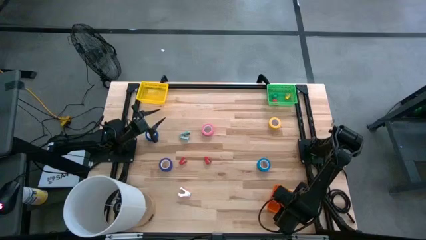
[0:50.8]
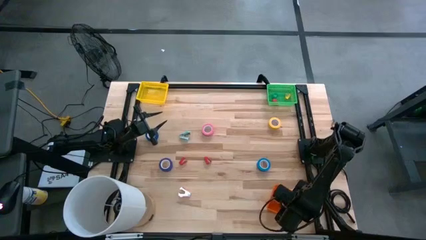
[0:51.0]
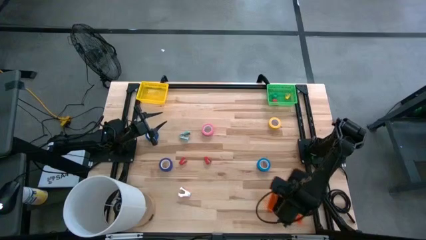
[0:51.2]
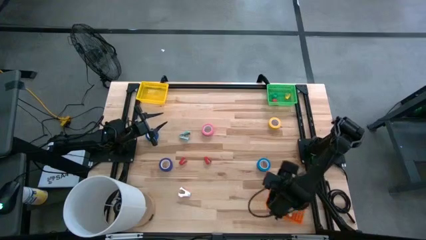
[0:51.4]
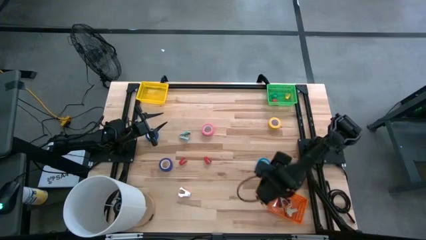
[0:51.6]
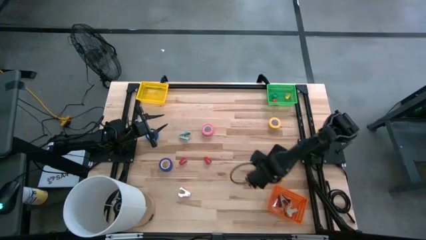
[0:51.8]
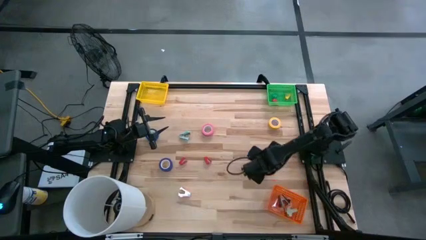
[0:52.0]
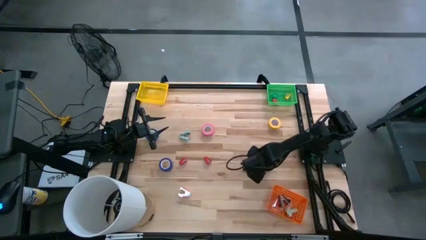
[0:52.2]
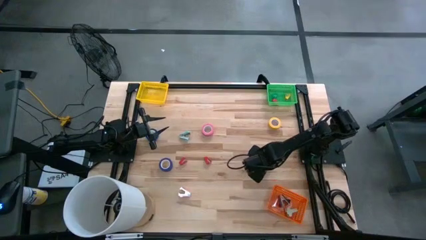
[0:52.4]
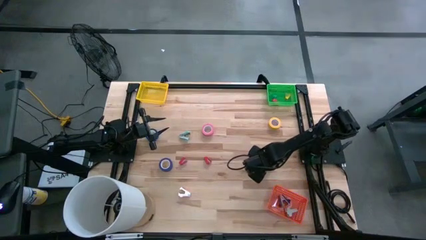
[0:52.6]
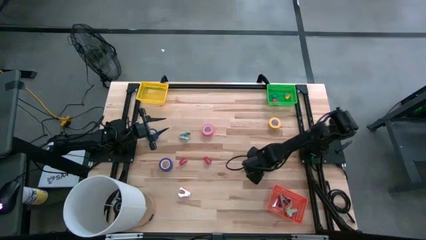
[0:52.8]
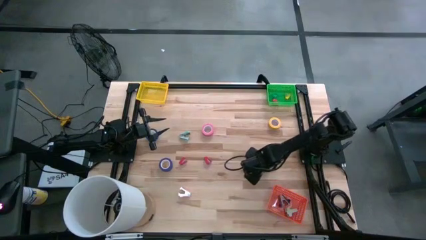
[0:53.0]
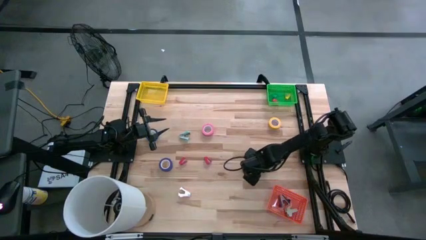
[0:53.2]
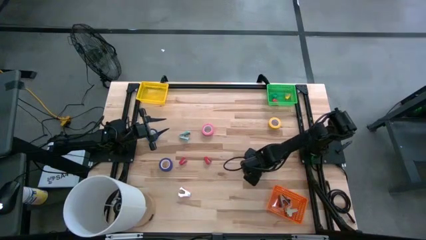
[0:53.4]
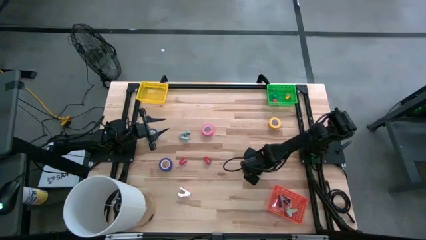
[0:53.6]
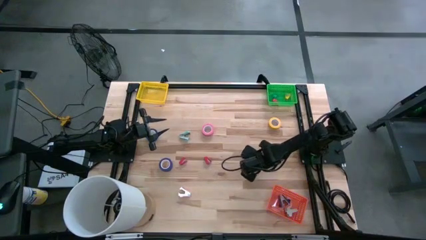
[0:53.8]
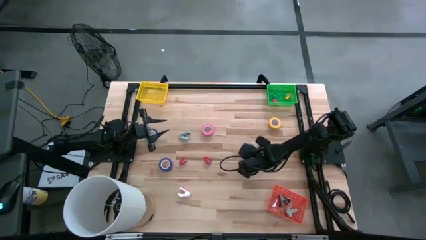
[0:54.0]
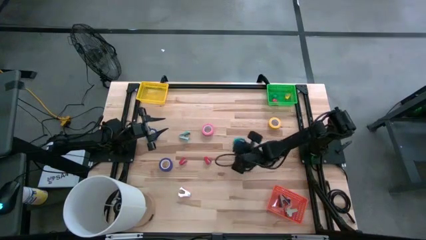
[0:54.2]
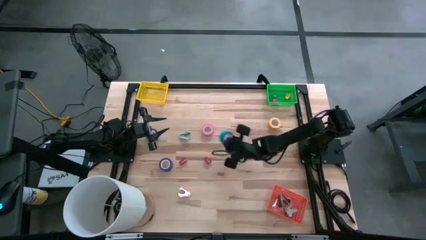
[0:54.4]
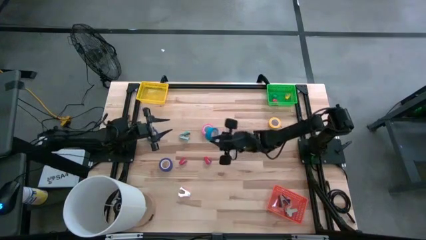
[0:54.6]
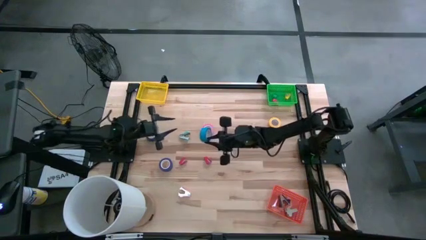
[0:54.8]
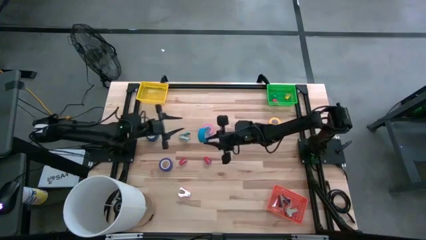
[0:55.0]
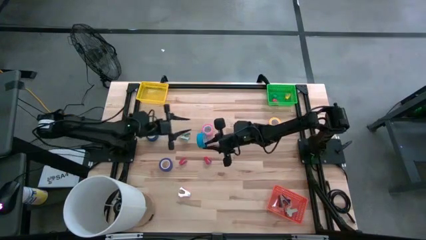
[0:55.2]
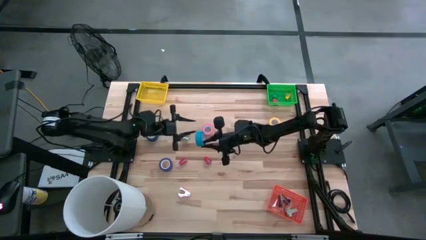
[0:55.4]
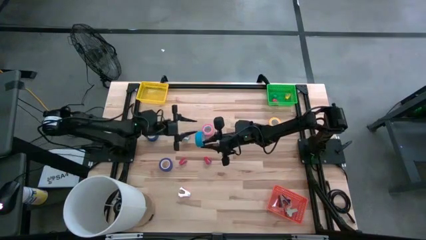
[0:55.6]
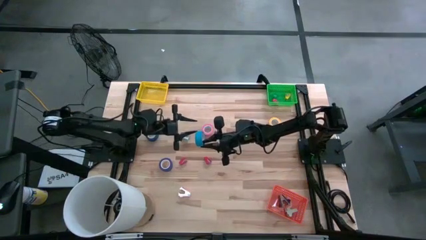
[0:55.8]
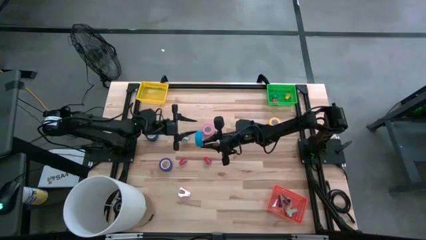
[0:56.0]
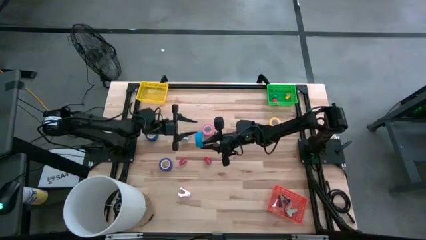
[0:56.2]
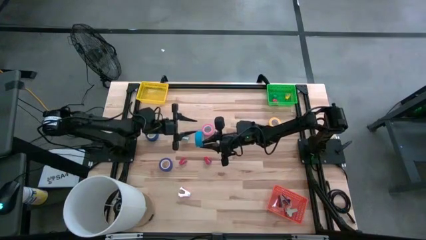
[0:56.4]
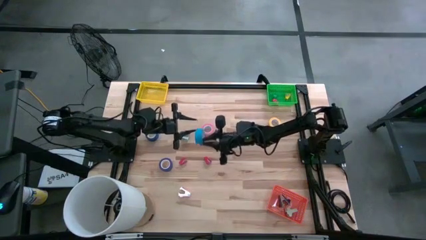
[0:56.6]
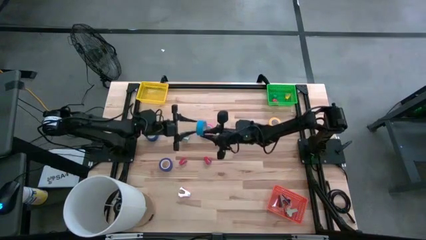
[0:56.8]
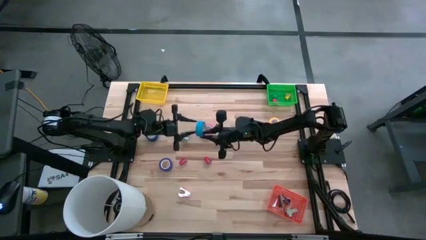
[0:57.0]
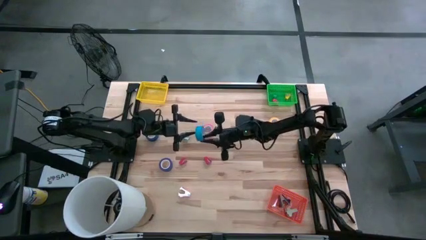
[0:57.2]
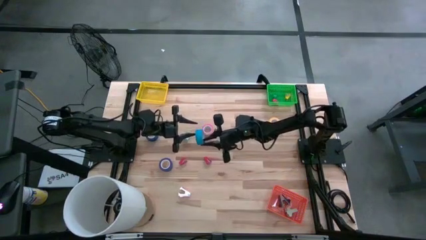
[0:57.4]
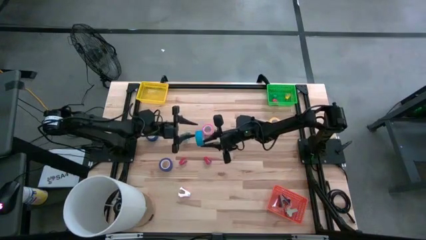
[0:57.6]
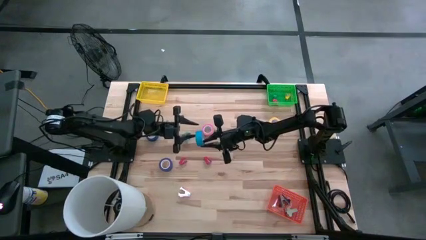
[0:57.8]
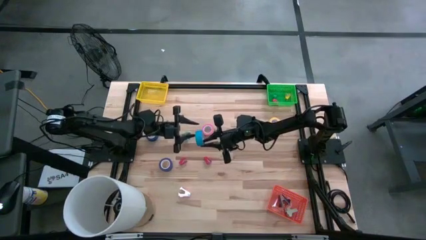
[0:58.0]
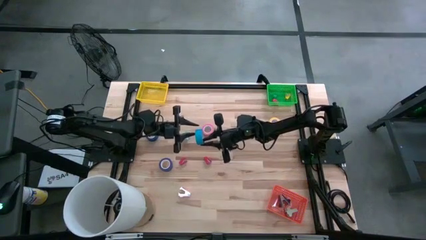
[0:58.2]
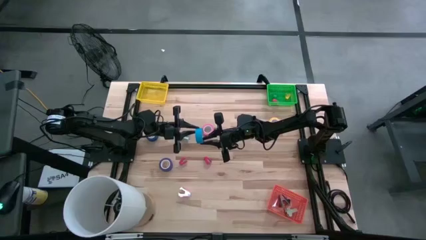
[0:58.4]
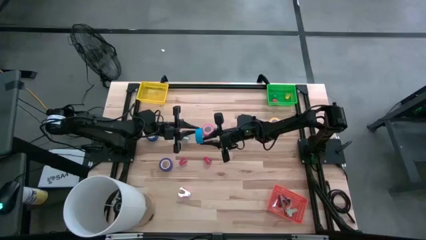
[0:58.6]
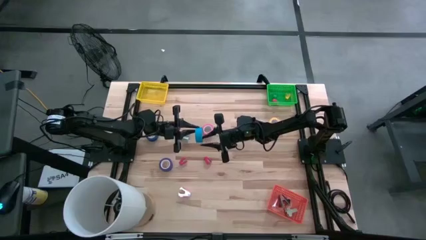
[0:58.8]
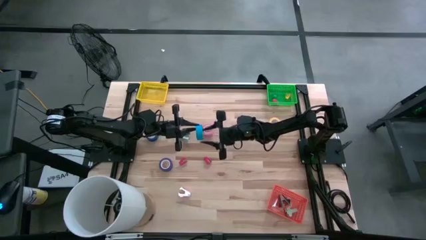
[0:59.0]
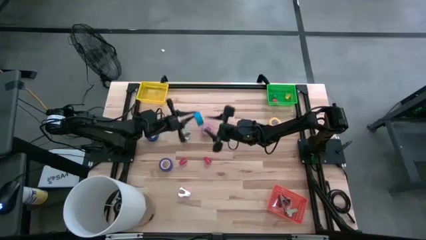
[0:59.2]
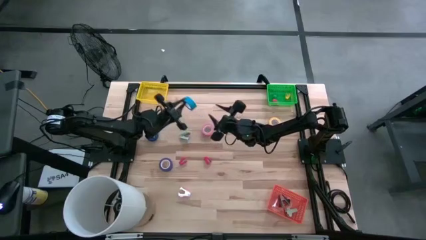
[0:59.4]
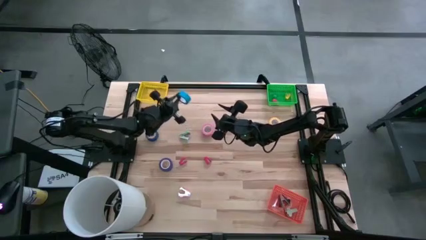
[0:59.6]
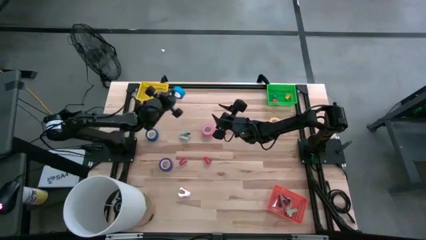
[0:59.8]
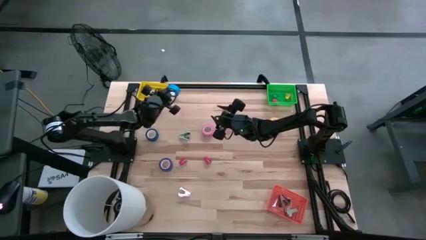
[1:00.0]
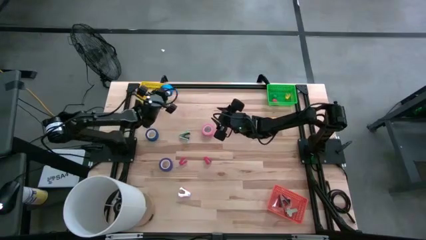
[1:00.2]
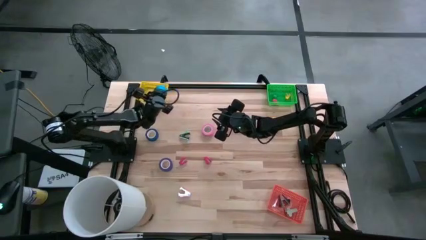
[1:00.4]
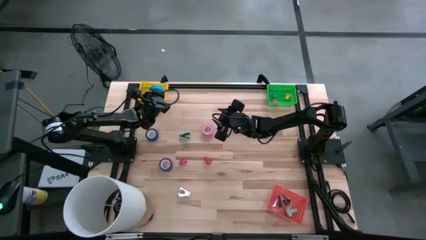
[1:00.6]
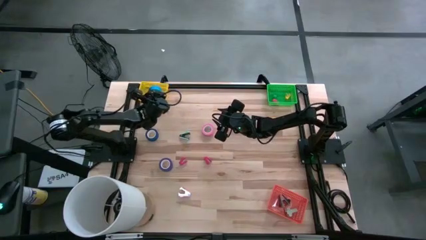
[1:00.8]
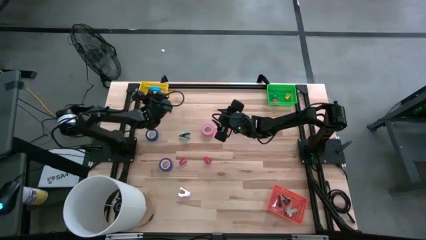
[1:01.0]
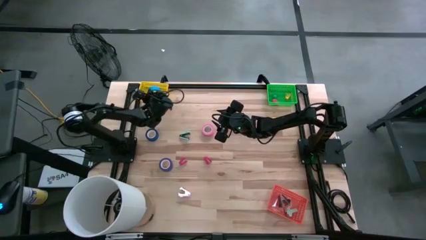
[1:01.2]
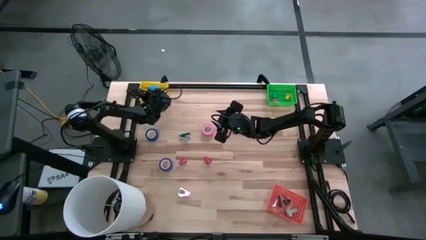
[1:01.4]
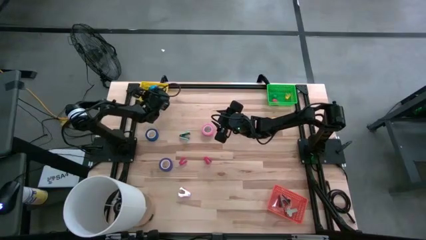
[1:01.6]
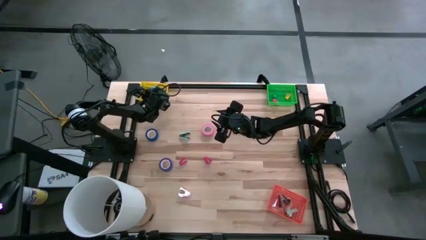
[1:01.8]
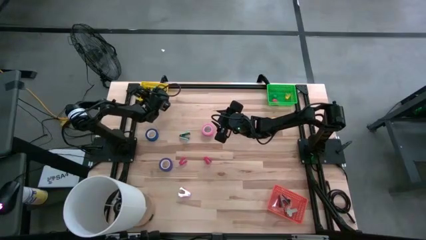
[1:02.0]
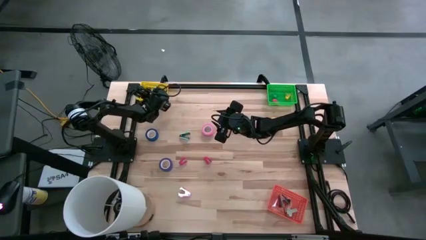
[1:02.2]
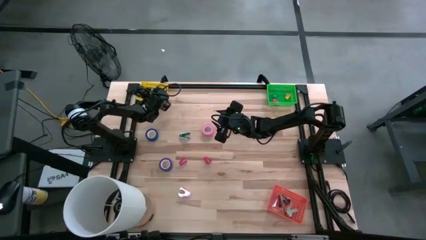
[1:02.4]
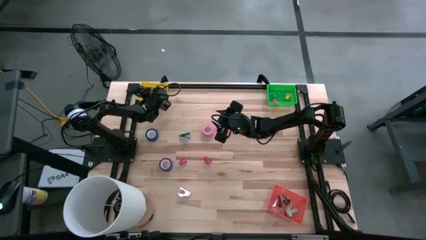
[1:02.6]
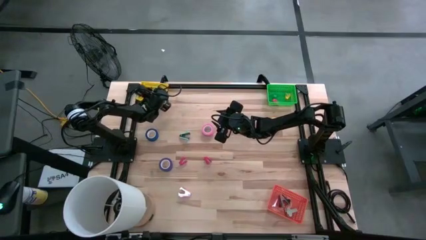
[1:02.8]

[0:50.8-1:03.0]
Task: Pick and place Stapler, Stapler remover, tape
Put the light blue tape into the yellow bin

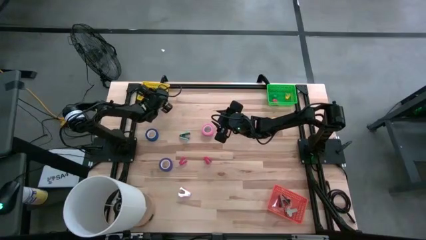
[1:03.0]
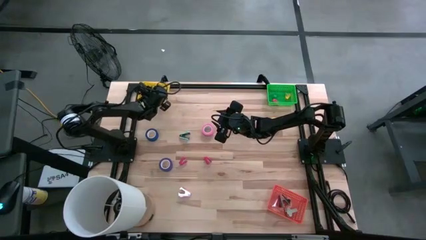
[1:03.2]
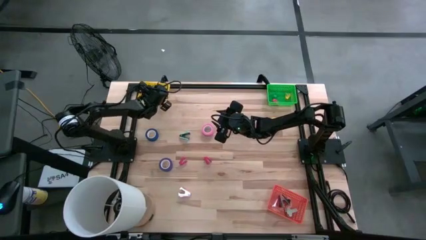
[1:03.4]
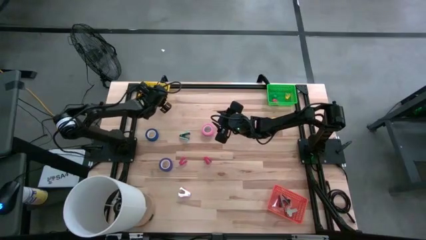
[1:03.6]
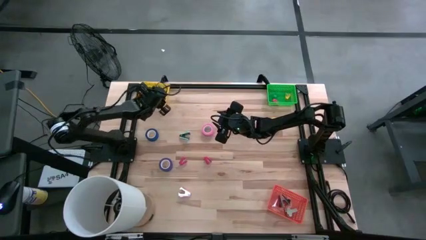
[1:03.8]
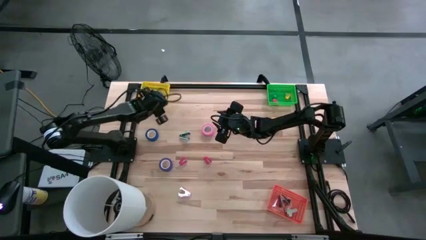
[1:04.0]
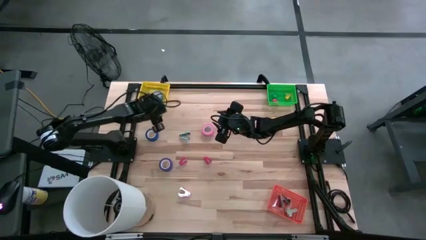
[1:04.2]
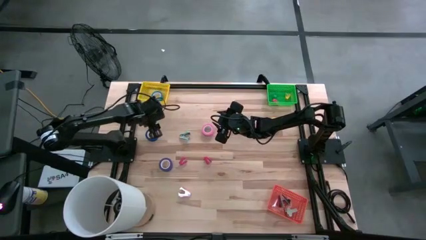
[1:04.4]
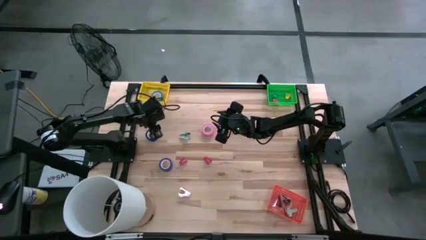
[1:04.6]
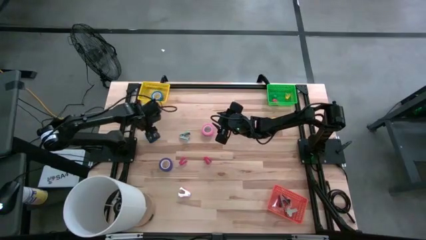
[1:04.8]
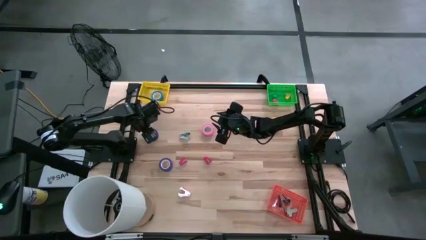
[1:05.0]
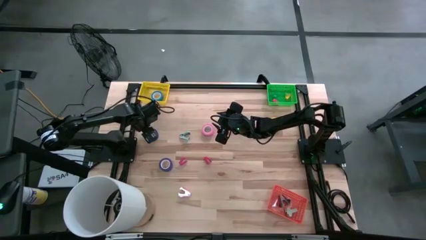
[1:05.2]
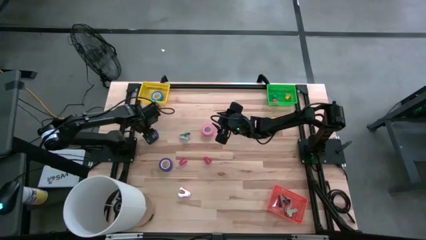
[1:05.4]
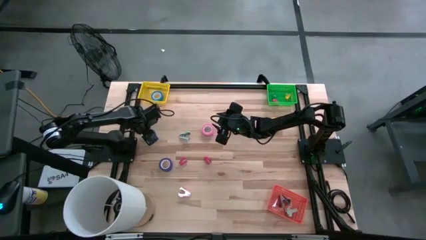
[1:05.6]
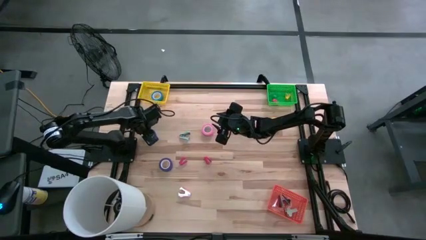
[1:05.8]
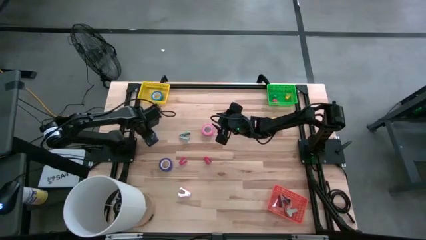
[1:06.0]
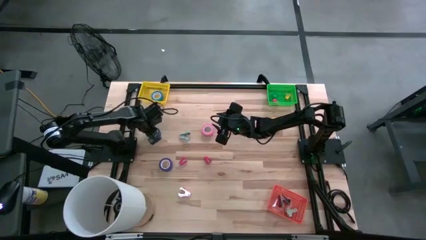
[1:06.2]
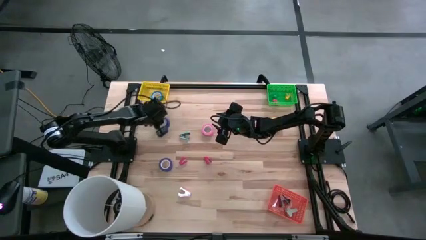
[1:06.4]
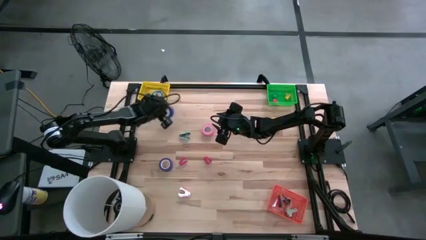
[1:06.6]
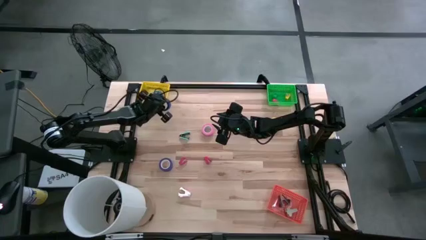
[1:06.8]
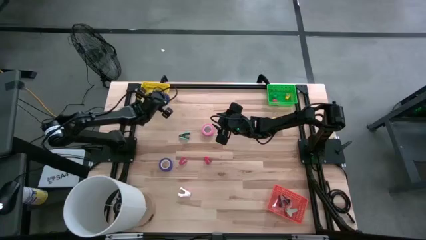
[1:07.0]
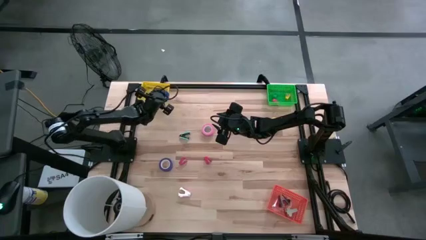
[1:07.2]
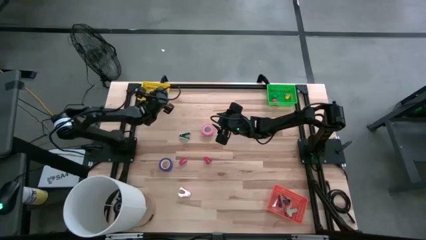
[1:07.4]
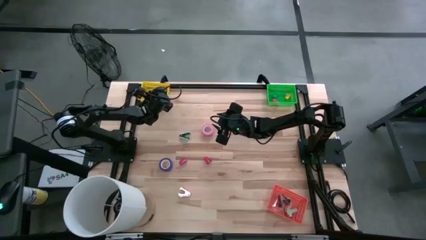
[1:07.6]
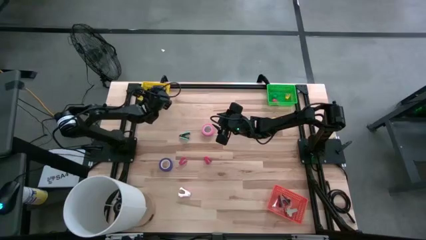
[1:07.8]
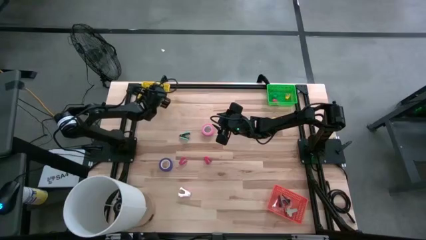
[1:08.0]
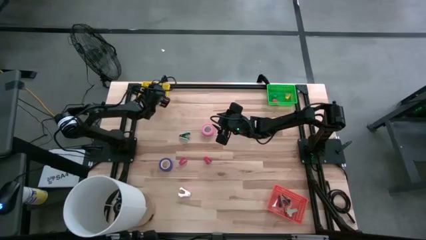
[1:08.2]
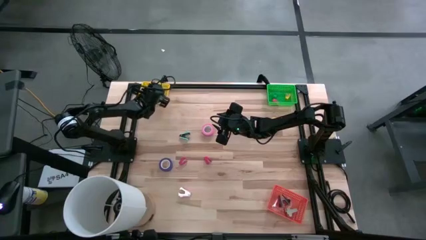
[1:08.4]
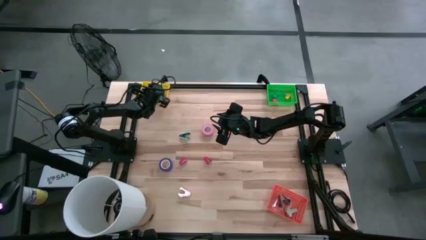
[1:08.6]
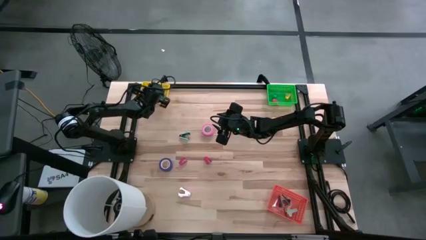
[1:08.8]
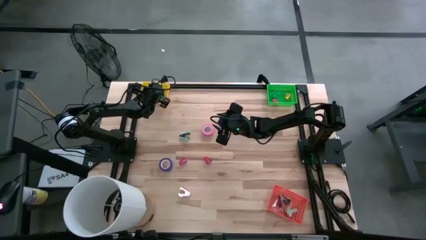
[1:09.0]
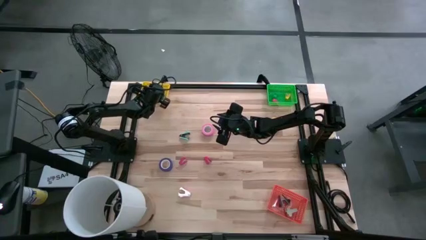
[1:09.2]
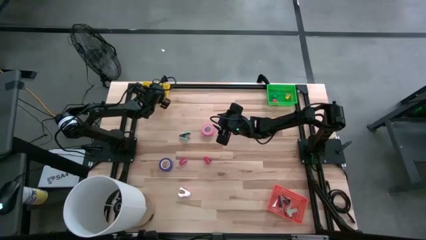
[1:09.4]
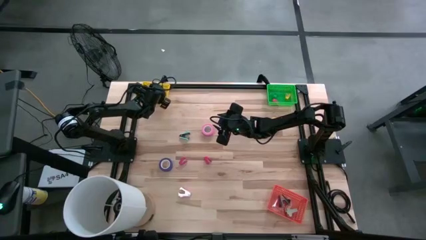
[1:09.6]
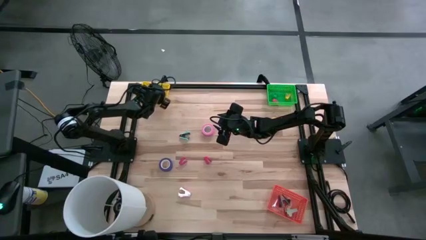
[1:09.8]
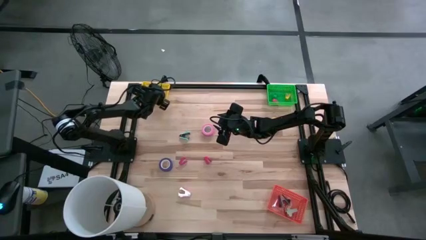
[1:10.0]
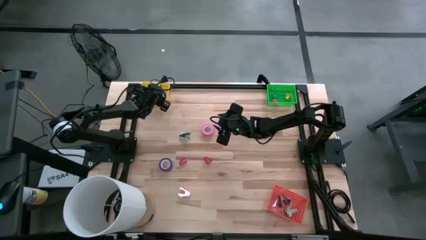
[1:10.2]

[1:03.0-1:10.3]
Put the blue tape into the yellow bin
